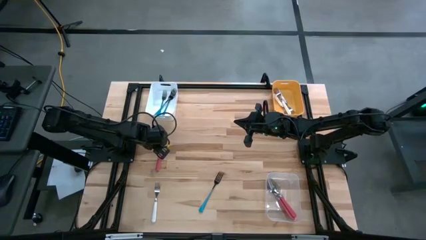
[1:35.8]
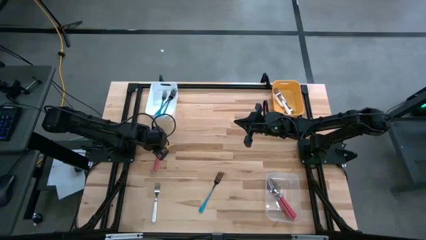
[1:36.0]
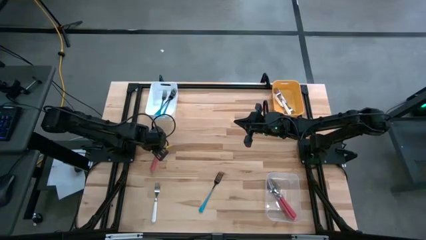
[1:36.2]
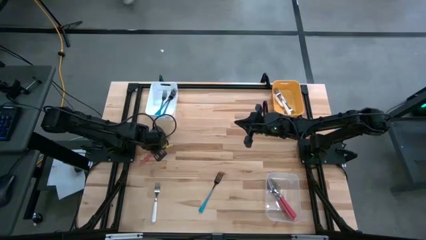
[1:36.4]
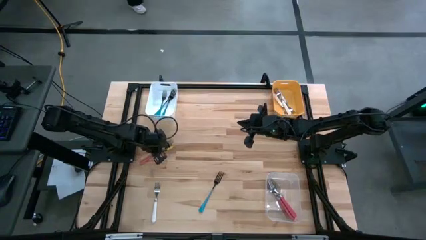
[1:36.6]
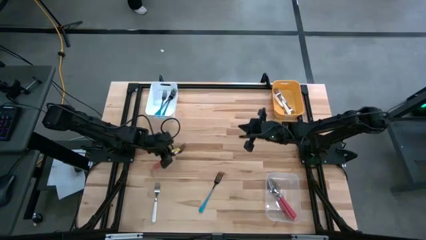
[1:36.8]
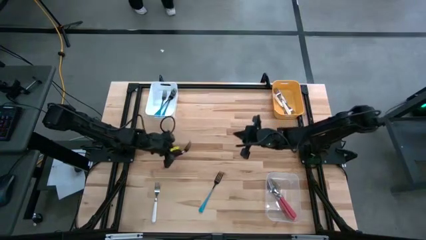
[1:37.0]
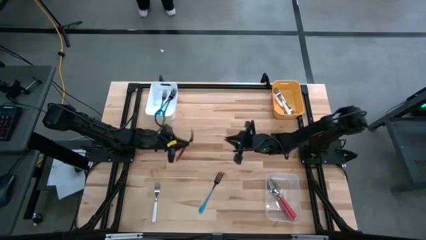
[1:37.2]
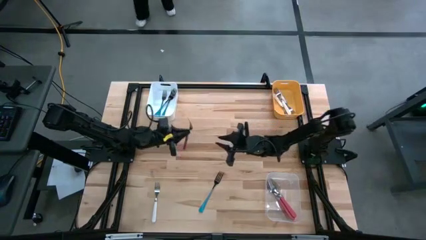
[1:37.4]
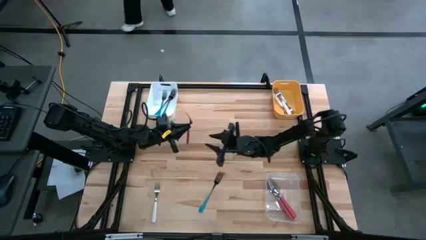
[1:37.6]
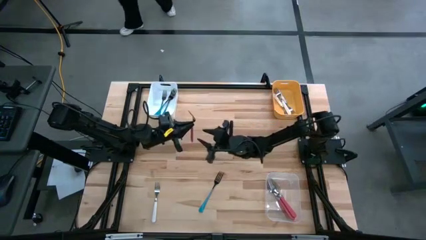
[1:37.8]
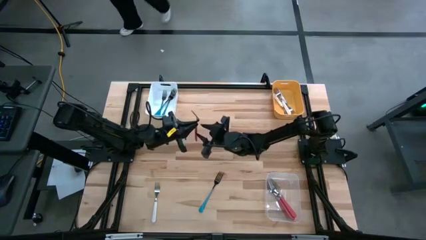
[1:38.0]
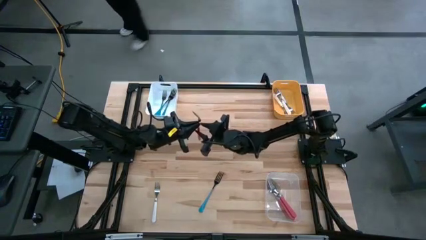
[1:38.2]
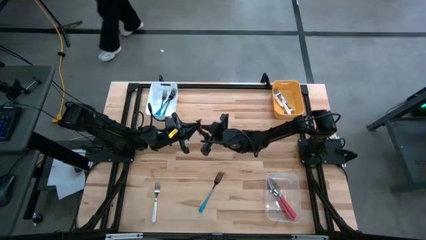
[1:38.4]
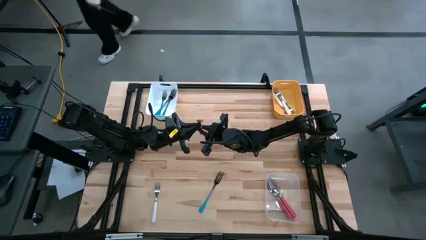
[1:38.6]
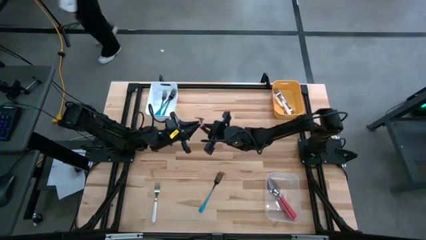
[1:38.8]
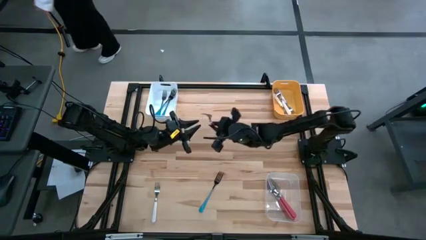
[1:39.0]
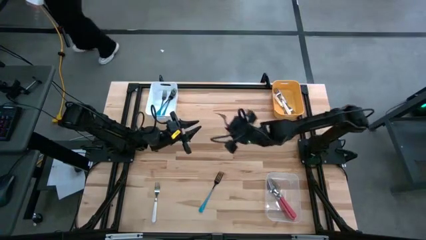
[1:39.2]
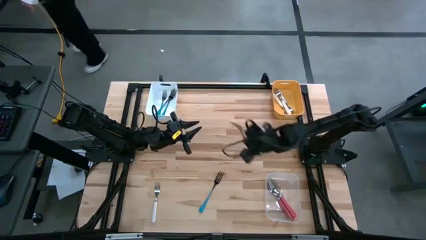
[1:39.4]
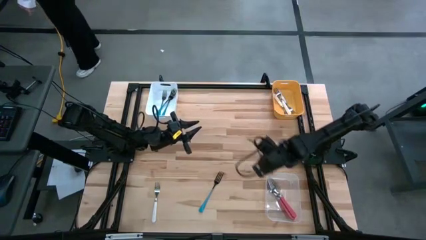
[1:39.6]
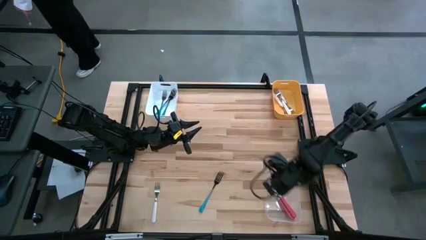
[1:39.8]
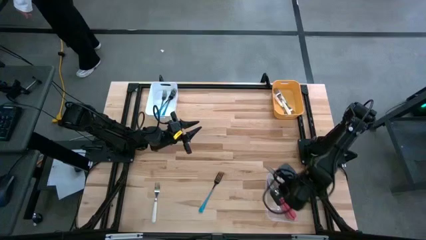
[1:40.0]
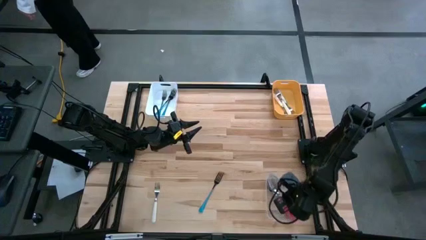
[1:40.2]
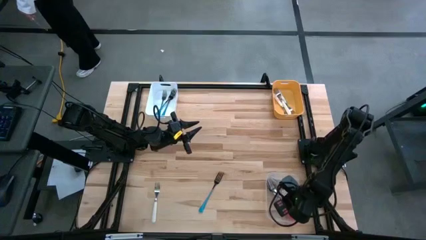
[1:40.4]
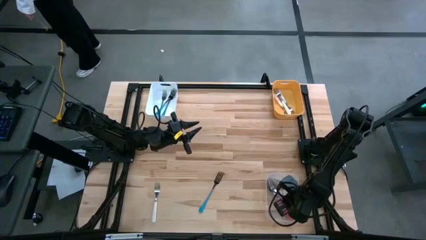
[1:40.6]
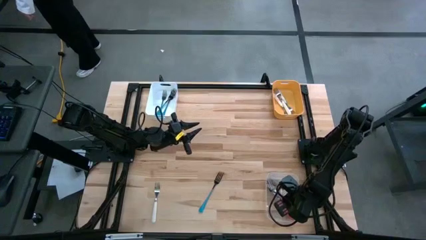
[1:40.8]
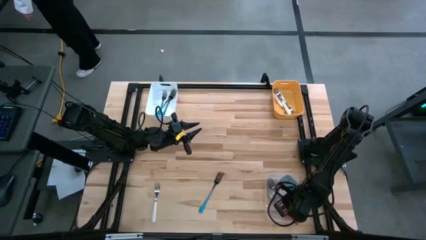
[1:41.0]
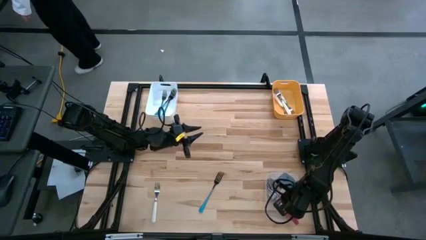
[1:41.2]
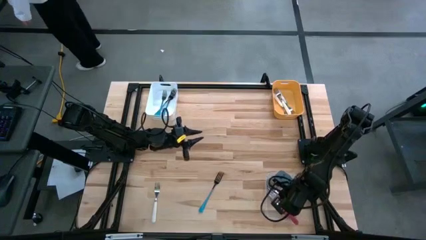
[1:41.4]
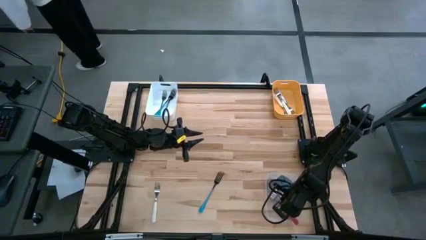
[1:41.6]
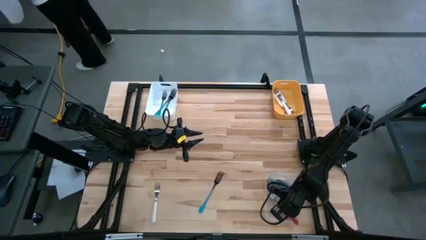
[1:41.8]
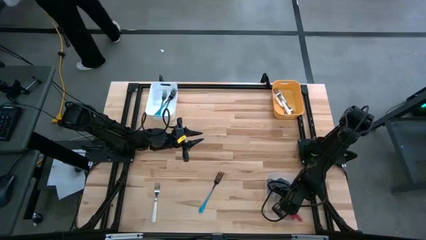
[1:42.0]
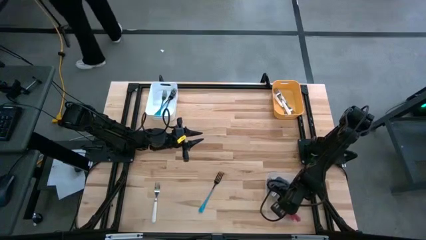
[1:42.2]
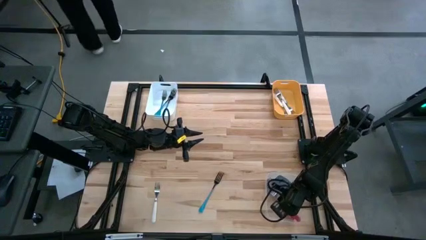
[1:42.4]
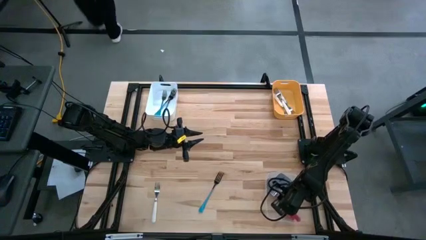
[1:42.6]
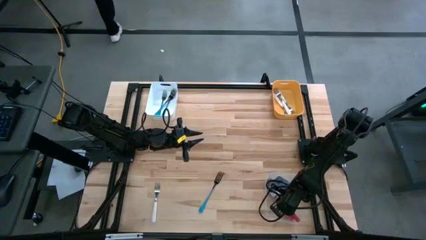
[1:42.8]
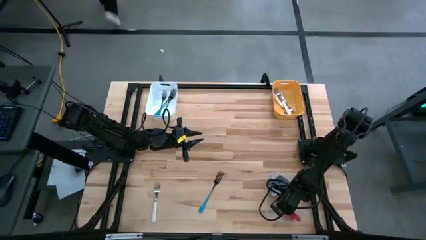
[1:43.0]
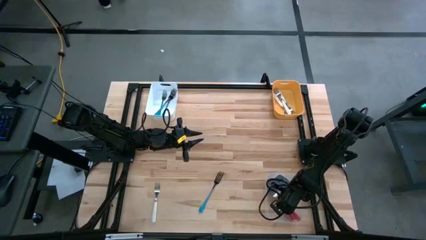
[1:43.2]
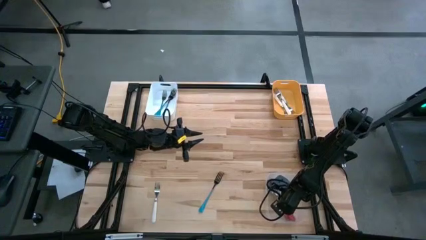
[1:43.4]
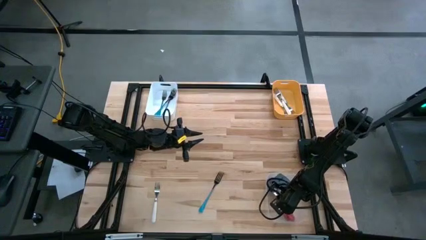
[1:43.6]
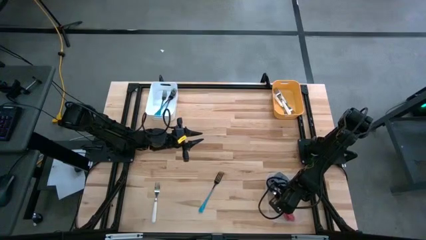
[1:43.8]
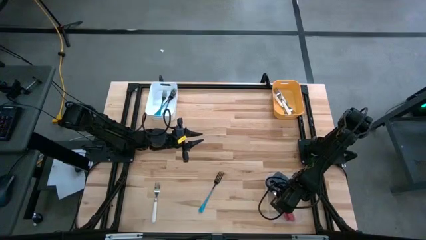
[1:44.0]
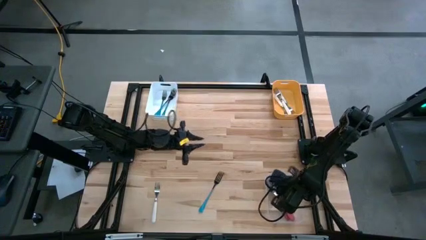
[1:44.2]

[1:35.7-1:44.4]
Task: Sort silverware by color (type)
Put the light red fork into the transparent bin

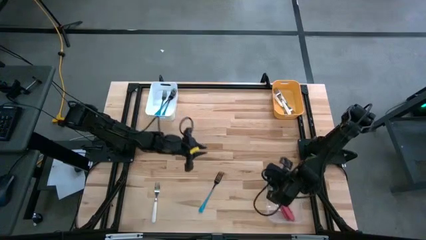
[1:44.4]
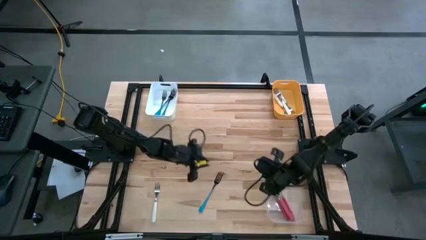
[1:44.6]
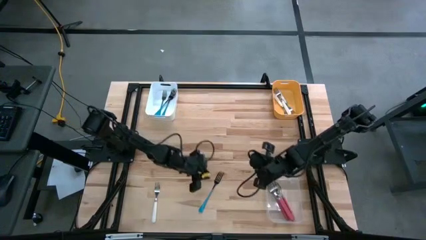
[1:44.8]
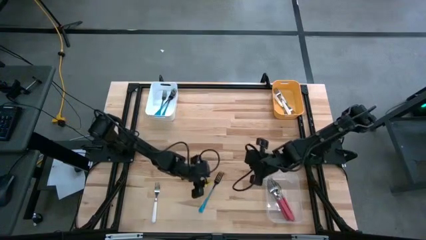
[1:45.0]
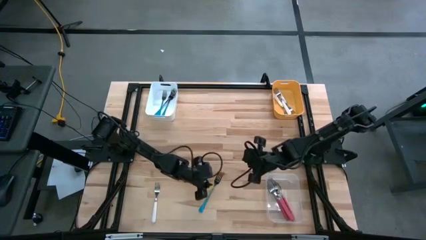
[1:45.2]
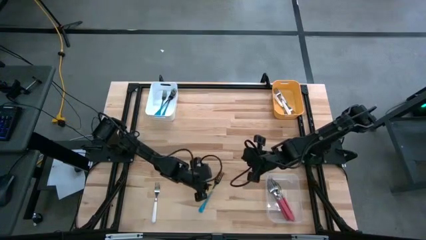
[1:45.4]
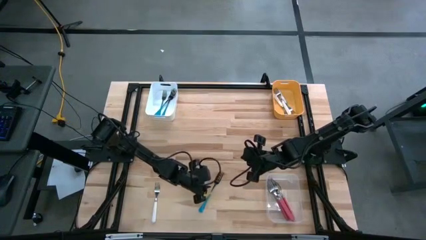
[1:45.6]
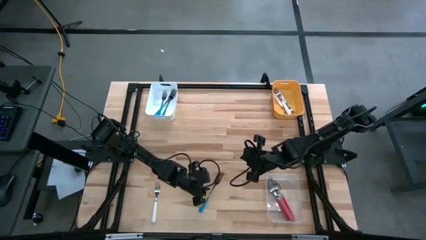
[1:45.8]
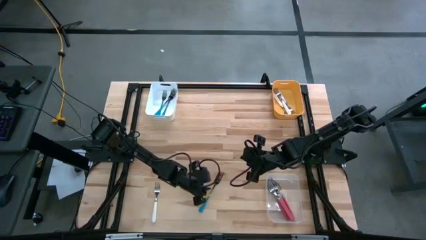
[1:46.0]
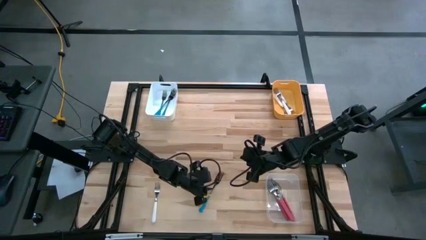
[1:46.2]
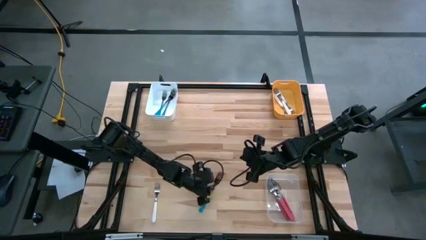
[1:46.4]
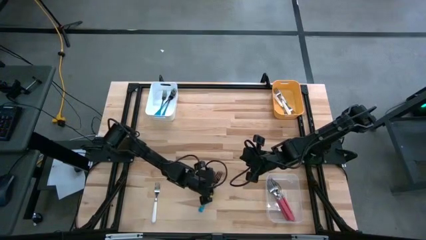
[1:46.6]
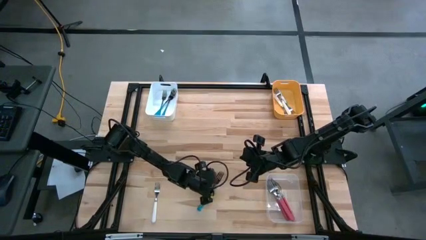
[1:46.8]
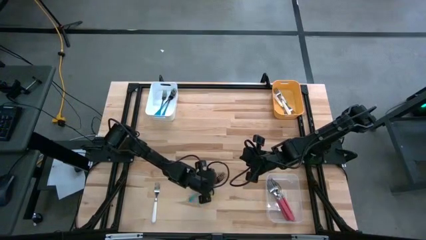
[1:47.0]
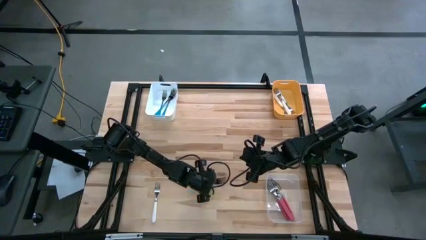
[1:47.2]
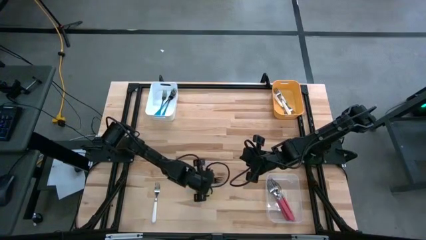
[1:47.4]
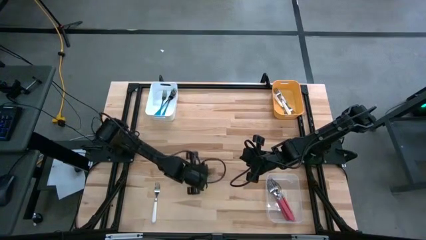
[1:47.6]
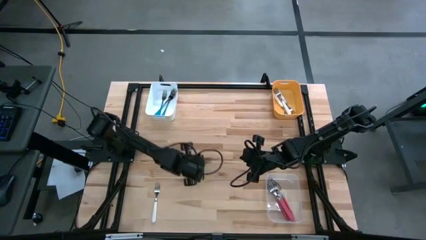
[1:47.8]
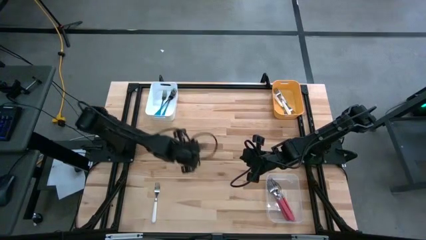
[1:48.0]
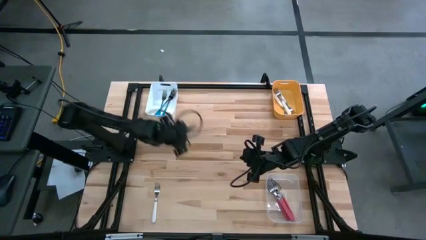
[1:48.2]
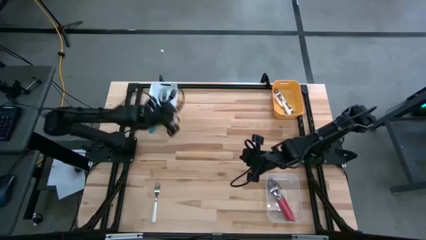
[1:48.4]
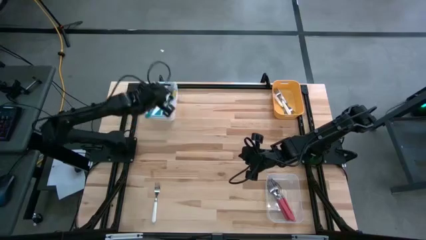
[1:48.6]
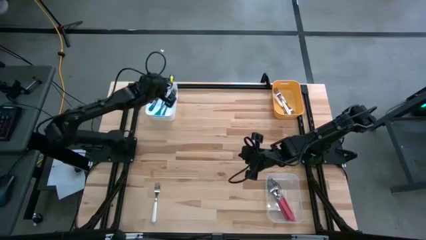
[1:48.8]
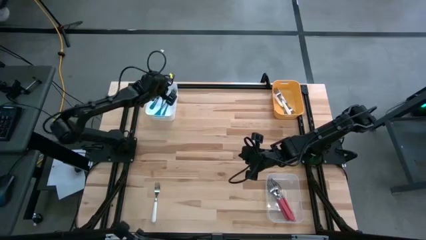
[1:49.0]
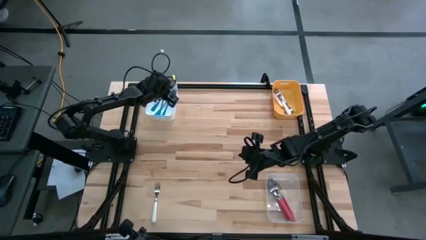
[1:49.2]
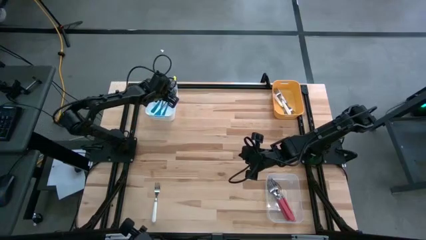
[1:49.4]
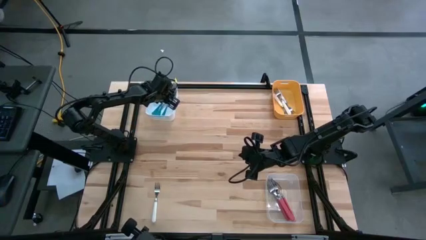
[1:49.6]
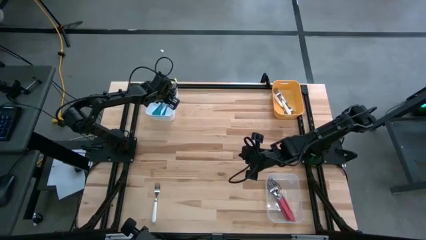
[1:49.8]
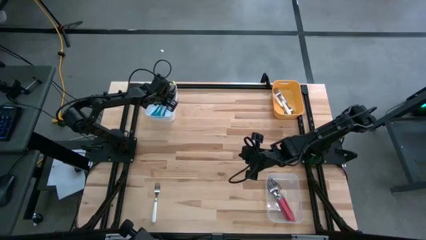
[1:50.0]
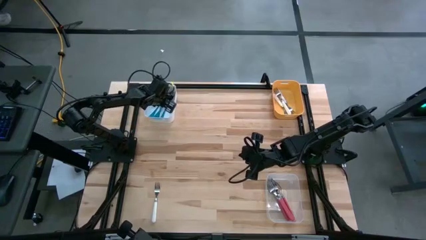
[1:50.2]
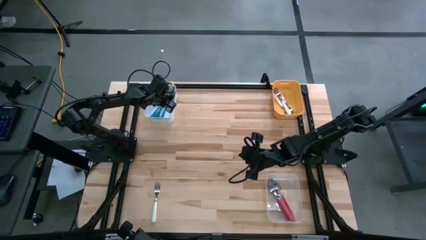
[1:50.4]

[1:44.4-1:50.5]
Put the blue fork into the white bin

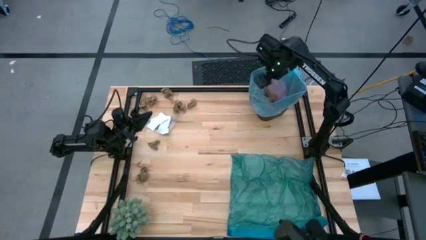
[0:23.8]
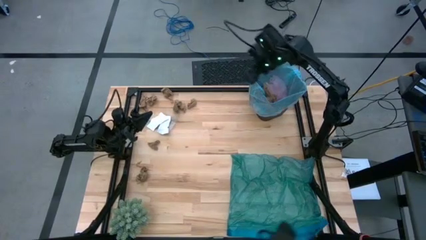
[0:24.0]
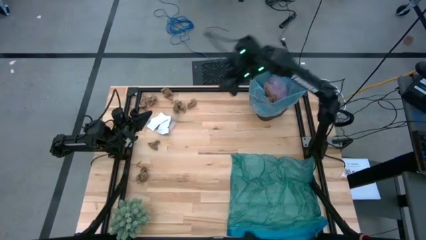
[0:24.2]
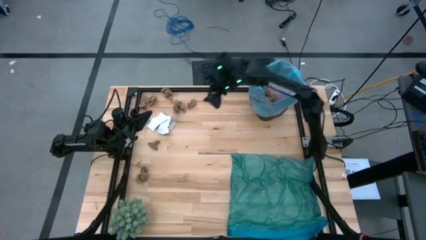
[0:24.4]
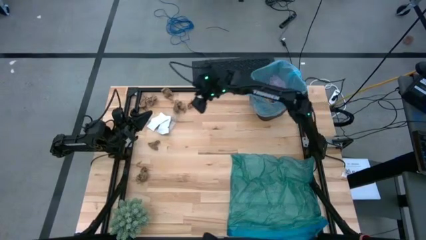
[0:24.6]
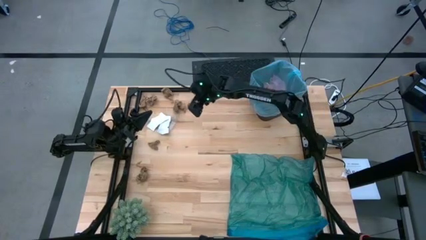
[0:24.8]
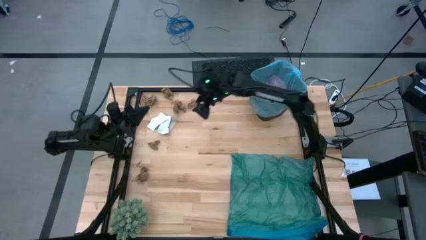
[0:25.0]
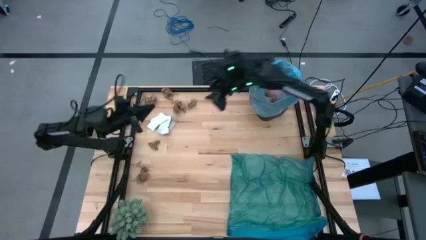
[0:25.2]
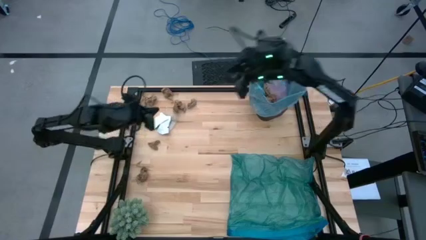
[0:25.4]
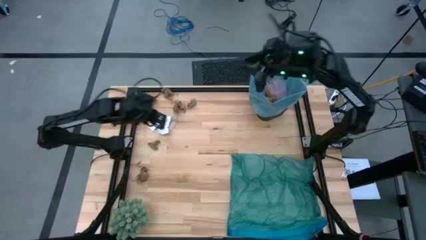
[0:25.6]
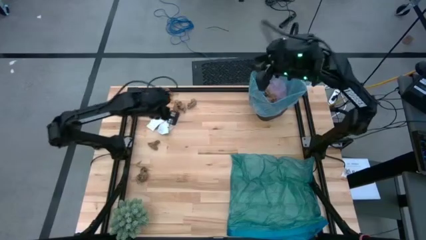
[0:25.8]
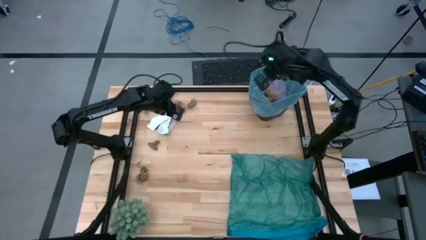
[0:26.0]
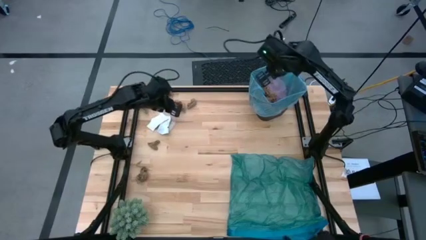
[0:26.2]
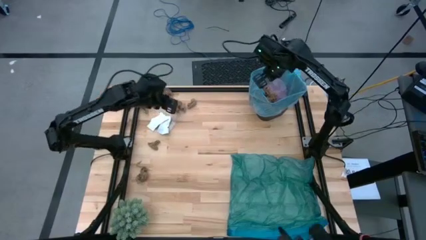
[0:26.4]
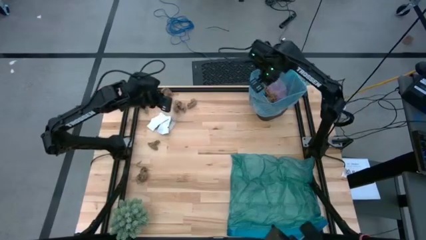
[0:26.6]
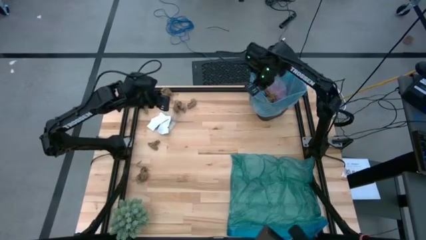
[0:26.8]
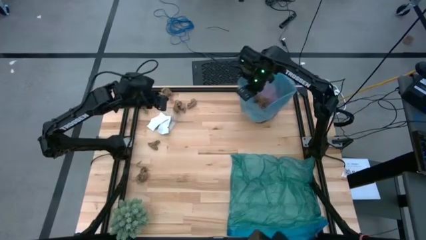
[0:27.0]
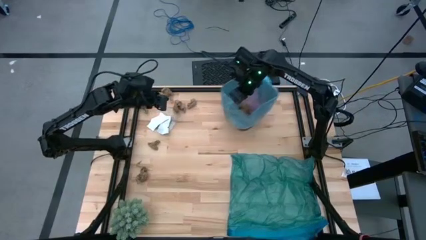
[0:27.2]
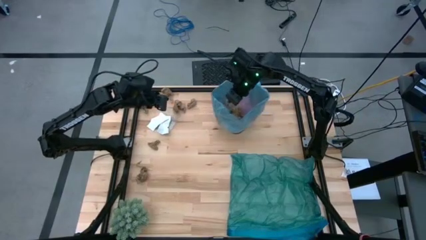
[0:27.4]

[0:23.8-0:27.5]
Task: place trash/remove bag and relplace
Move the black trash bin to the top center of the table
